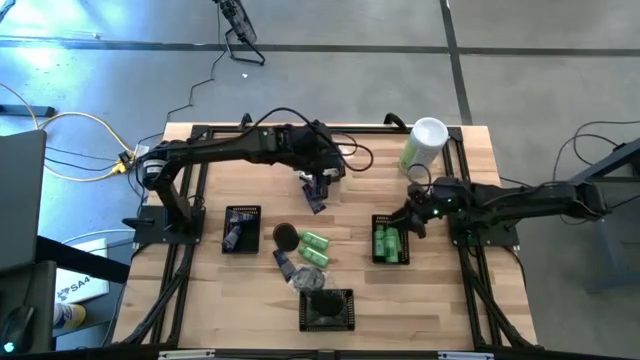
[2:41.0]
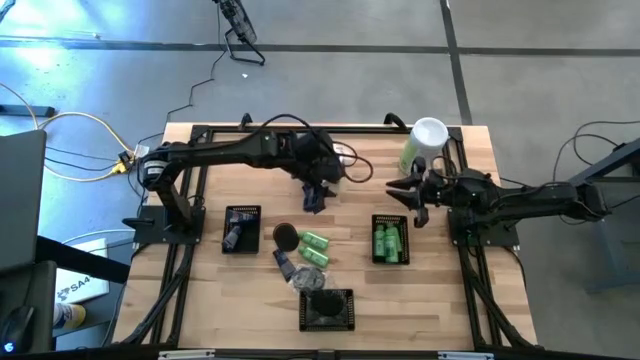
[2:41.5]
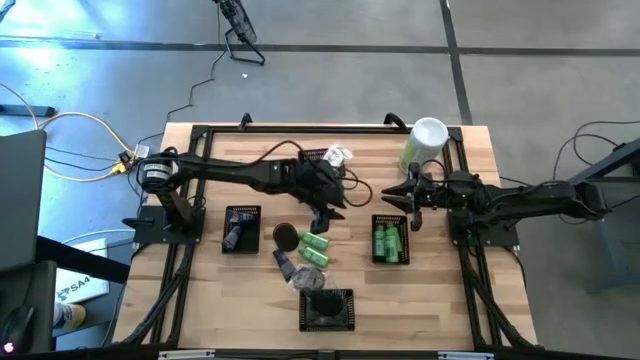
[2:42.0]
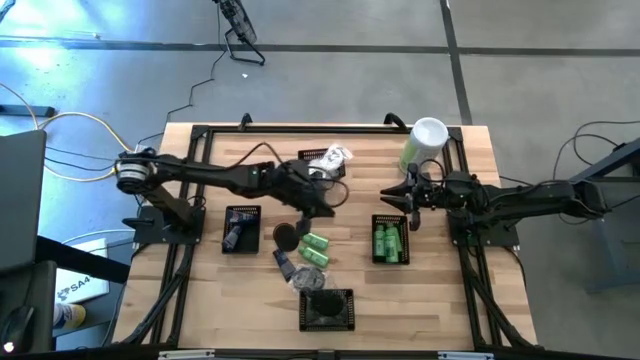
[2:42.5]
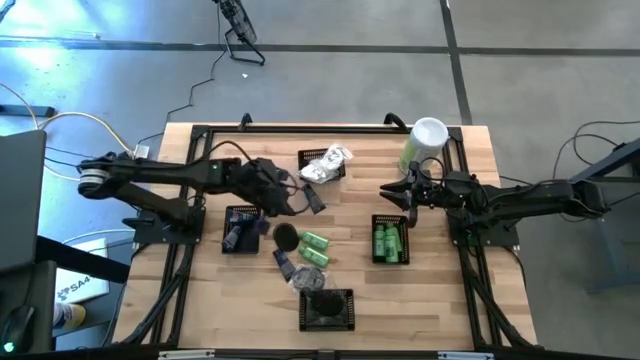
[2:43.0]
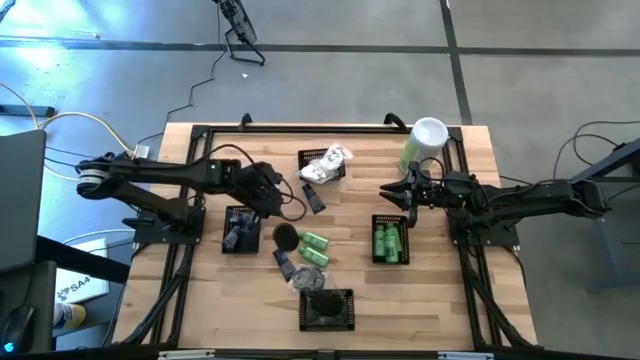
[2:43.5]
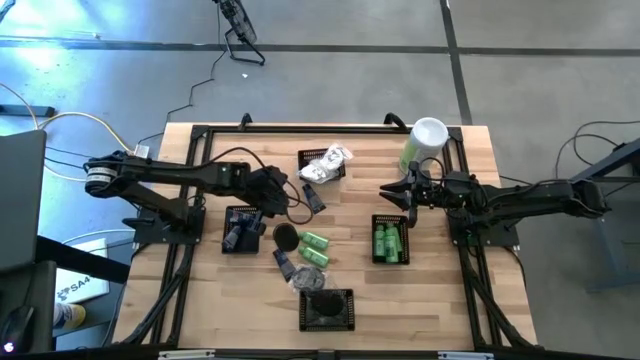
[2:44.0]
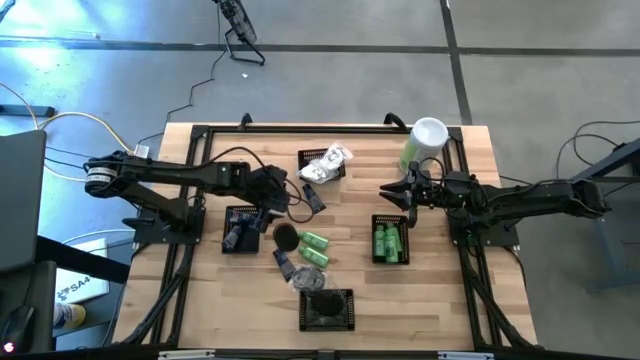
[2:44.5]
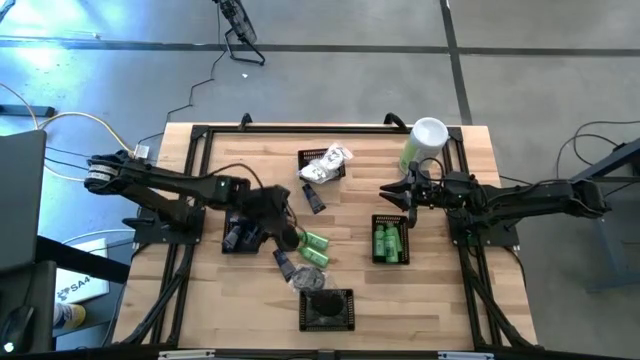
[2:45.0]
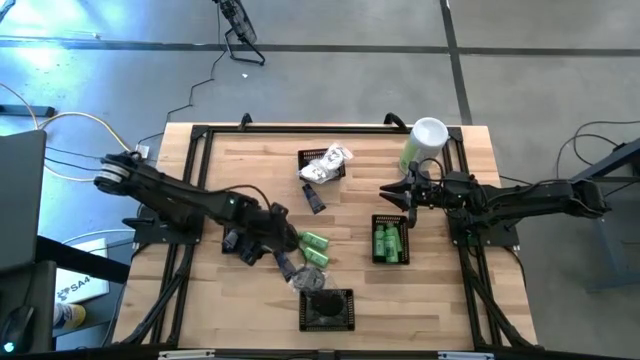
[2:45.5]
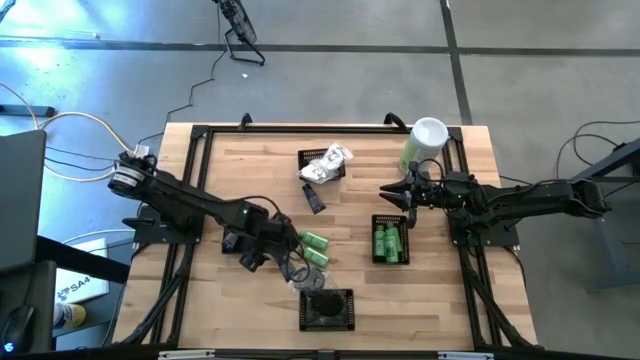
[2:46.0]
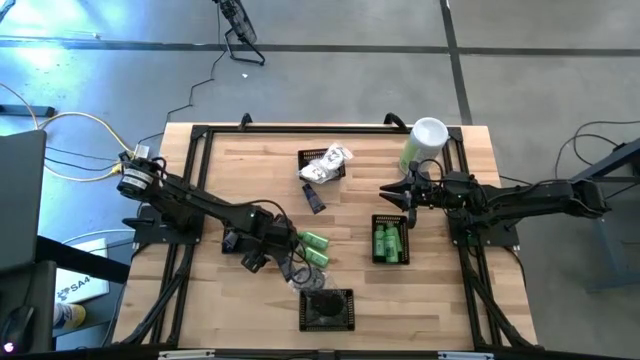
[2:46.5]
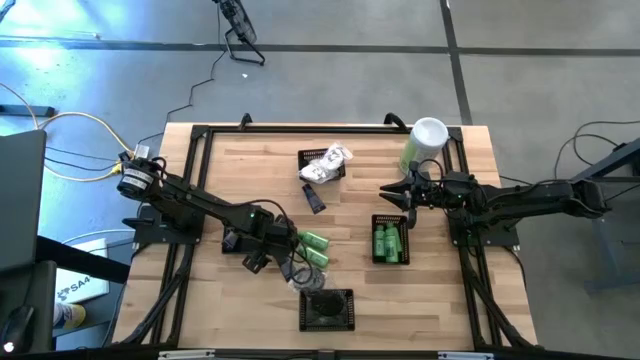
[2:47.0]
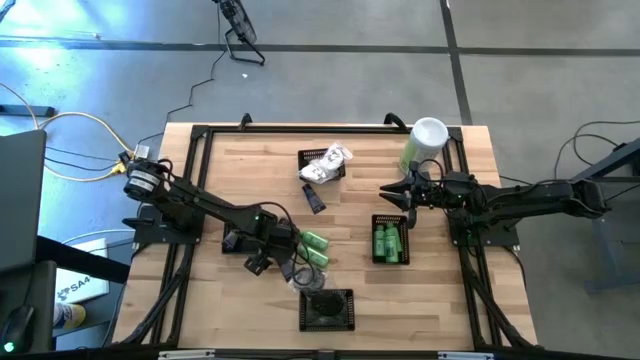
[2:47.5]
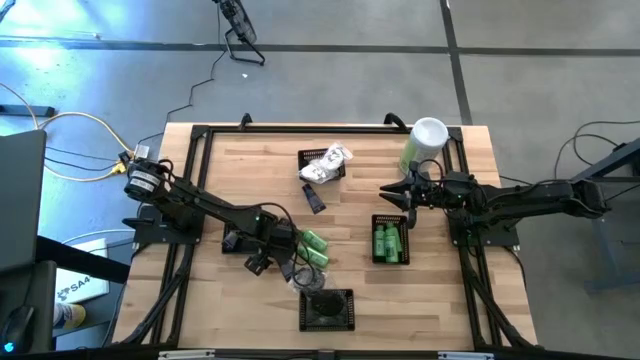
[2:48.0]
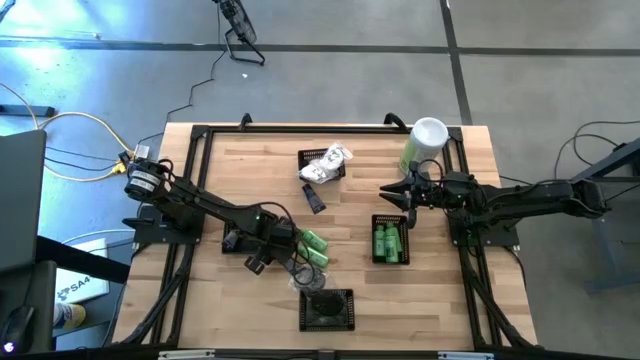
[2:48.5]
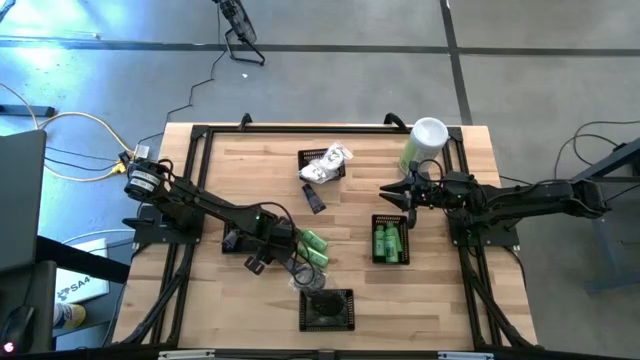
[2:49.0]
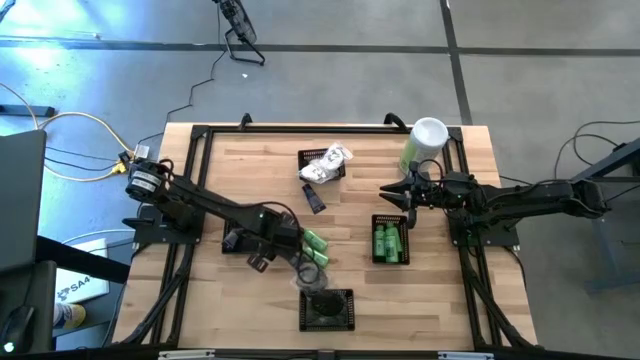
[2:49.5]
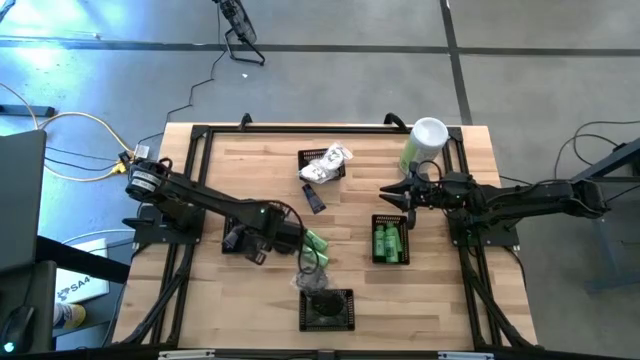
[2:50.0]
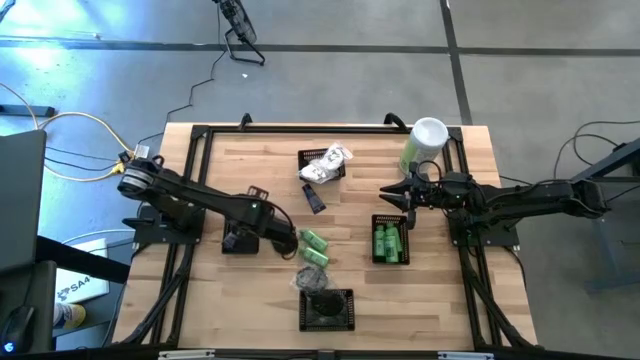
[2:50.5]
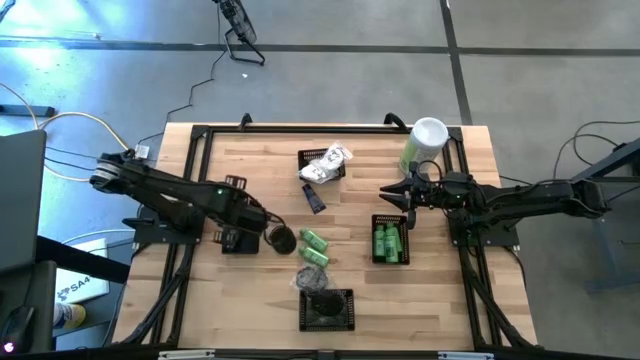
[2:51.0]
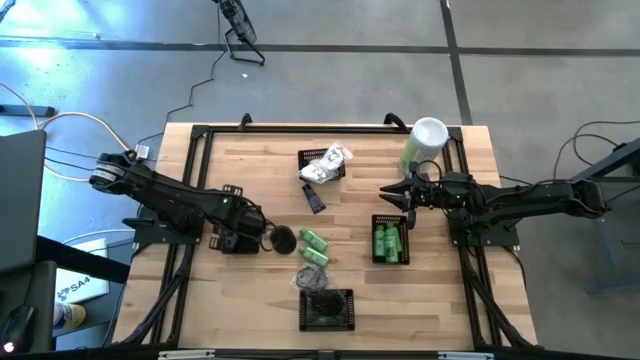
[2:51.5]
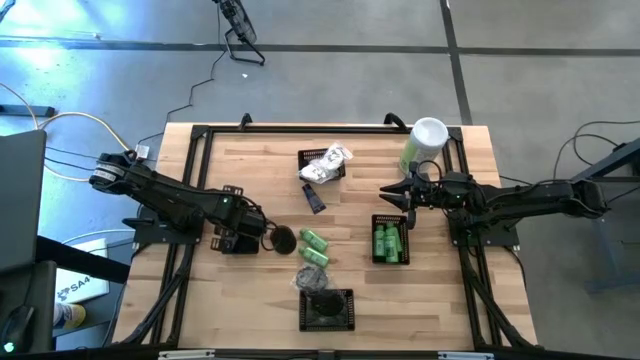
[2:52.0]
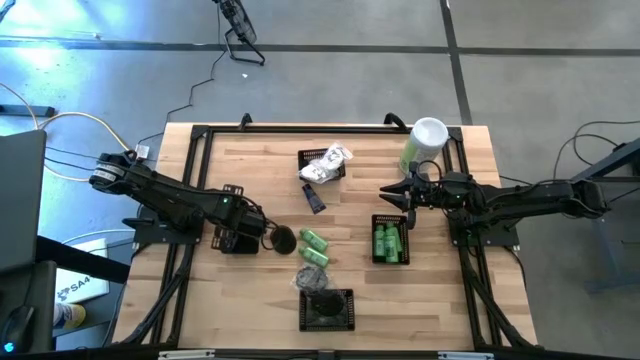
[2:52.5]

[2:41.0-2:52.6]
Task: Pick & Place Travel size toiletries
Put the blue bottle into the middle left black bin
